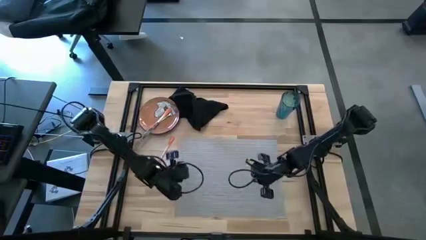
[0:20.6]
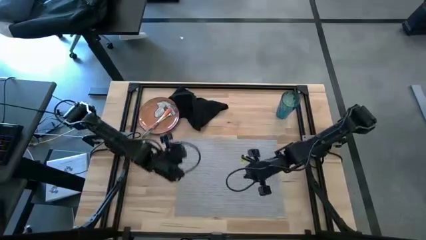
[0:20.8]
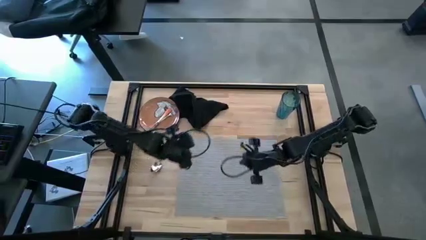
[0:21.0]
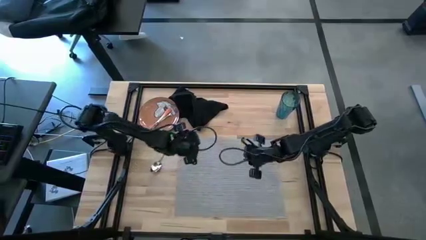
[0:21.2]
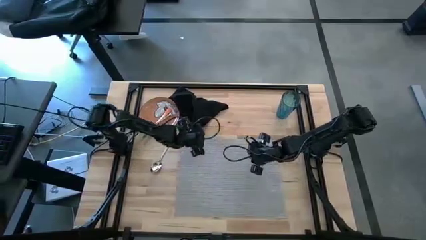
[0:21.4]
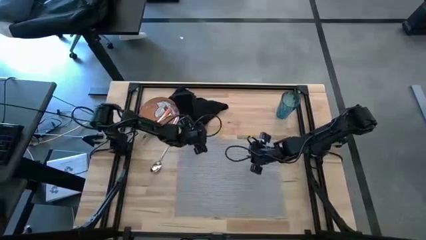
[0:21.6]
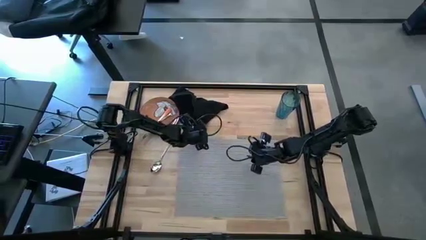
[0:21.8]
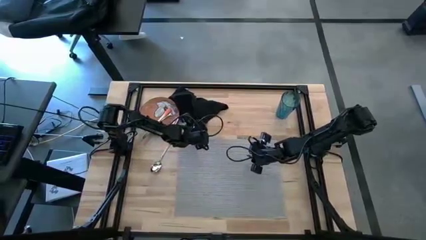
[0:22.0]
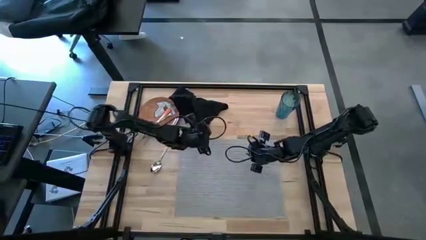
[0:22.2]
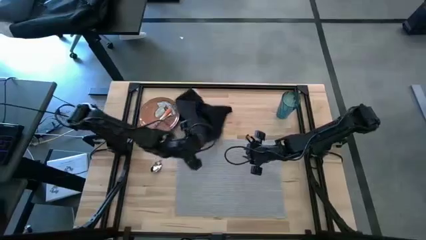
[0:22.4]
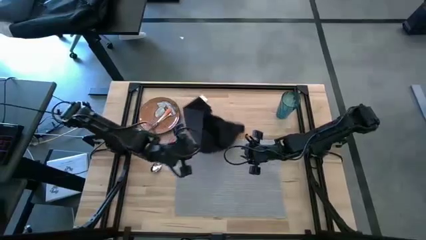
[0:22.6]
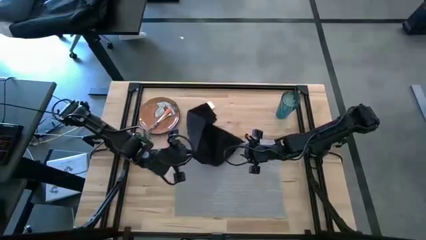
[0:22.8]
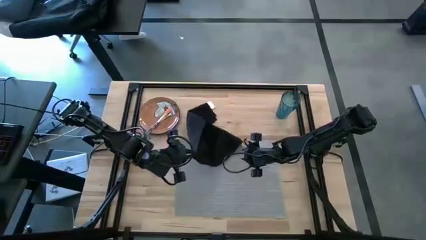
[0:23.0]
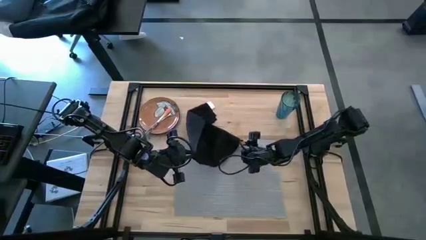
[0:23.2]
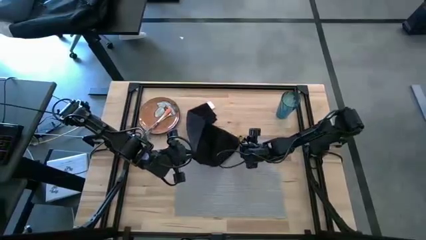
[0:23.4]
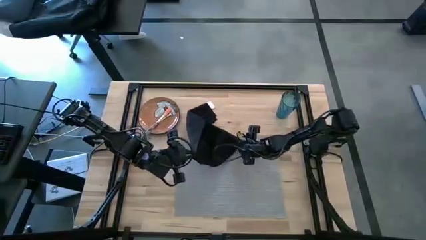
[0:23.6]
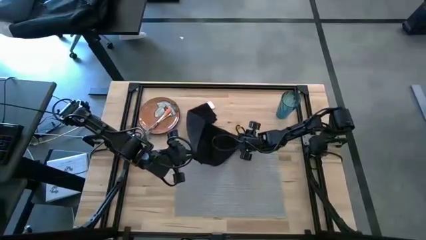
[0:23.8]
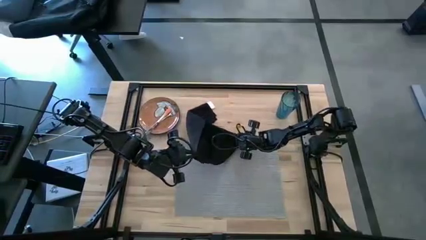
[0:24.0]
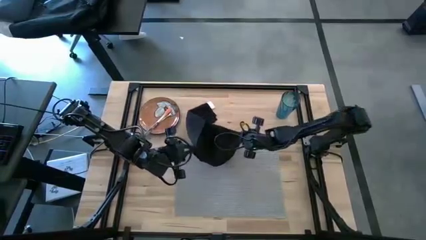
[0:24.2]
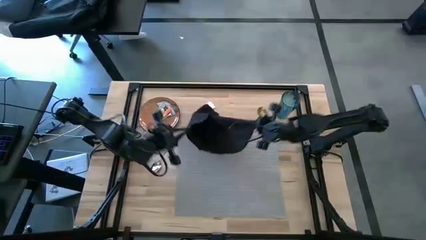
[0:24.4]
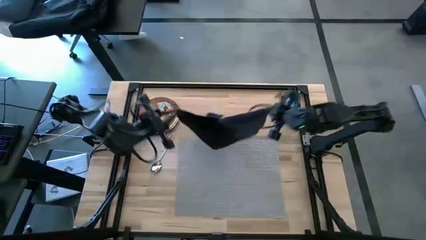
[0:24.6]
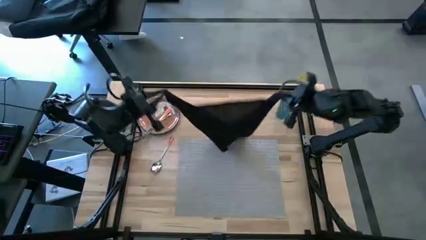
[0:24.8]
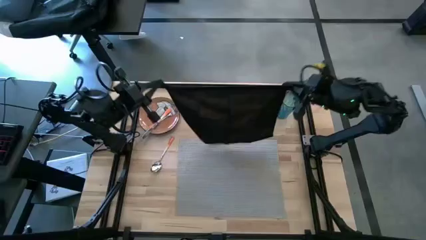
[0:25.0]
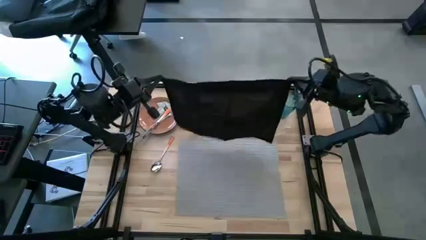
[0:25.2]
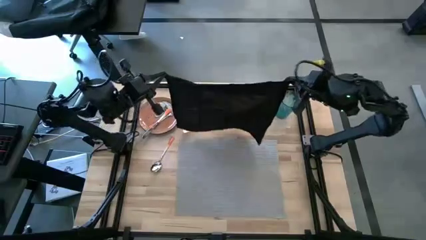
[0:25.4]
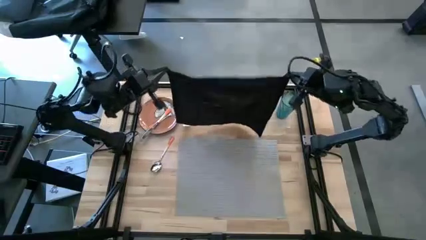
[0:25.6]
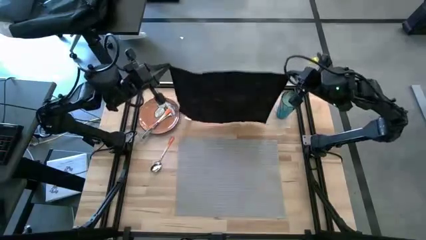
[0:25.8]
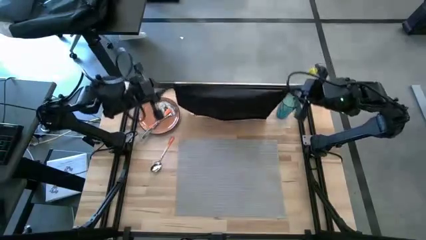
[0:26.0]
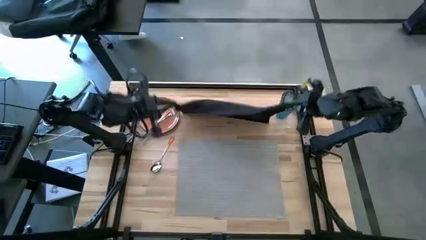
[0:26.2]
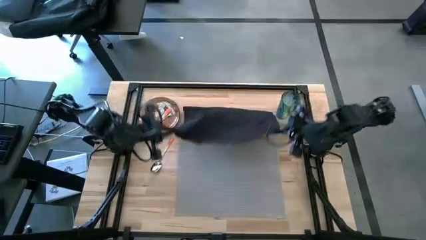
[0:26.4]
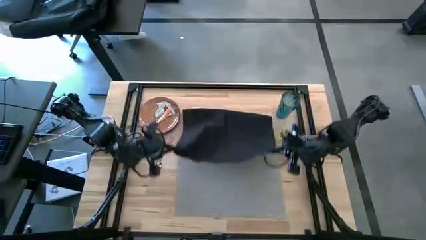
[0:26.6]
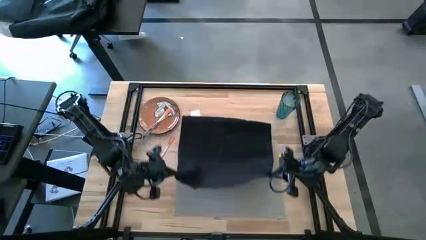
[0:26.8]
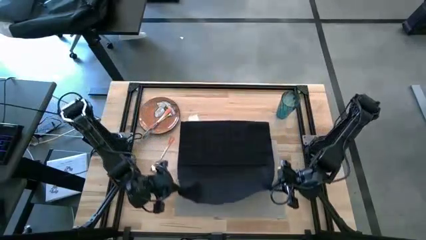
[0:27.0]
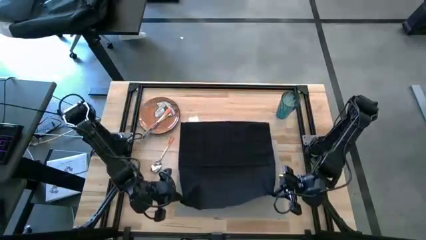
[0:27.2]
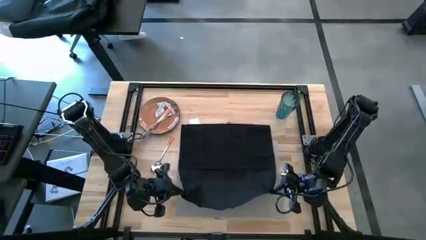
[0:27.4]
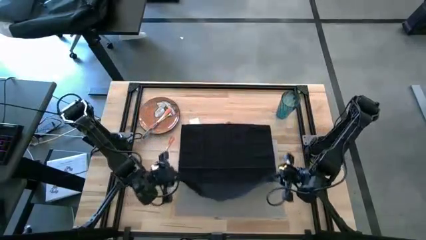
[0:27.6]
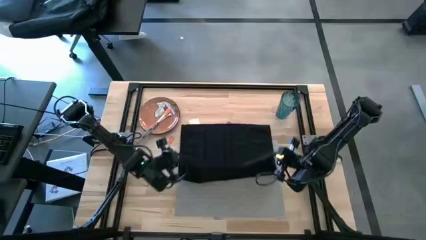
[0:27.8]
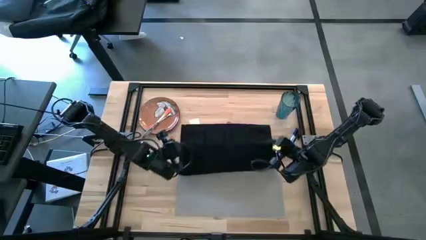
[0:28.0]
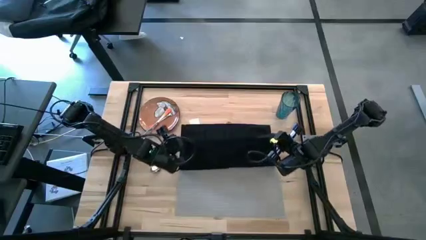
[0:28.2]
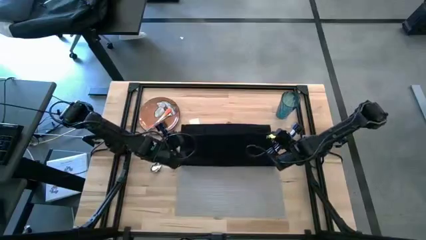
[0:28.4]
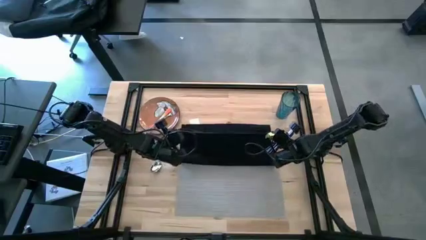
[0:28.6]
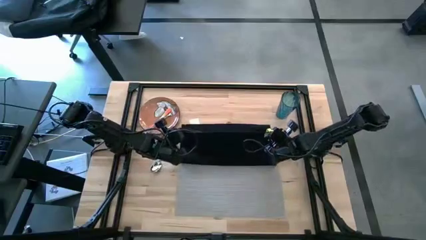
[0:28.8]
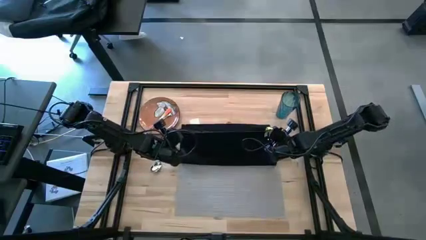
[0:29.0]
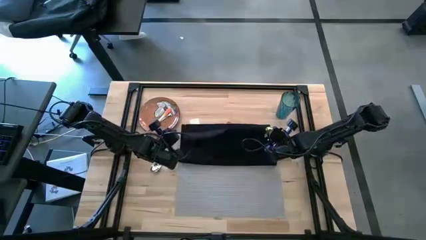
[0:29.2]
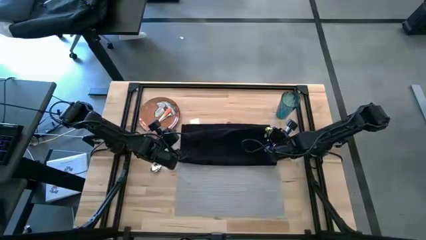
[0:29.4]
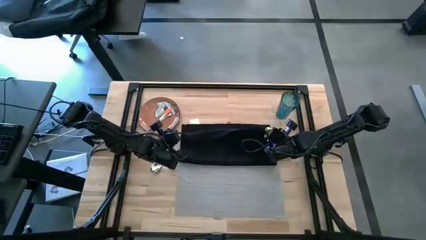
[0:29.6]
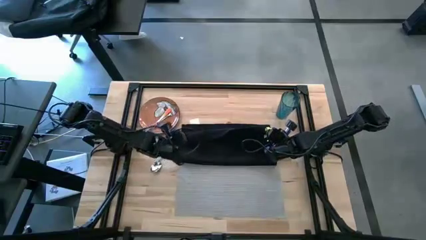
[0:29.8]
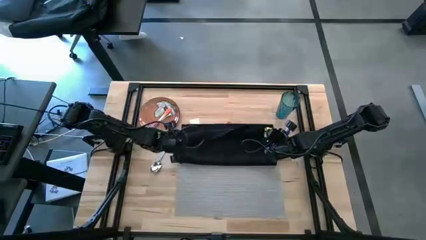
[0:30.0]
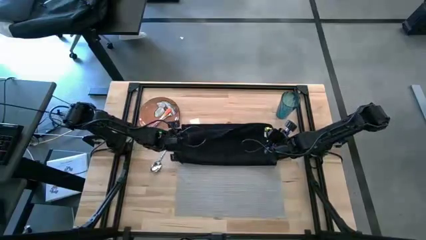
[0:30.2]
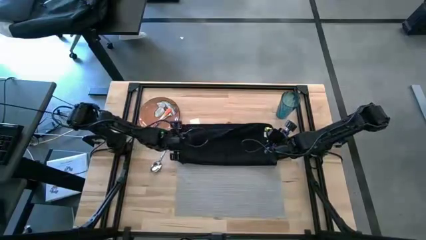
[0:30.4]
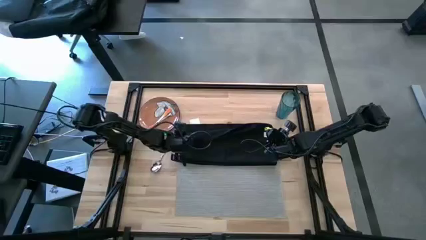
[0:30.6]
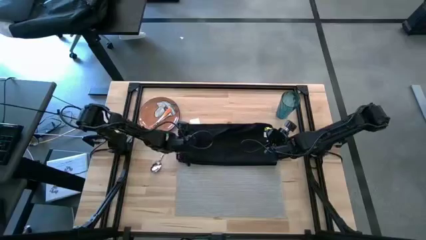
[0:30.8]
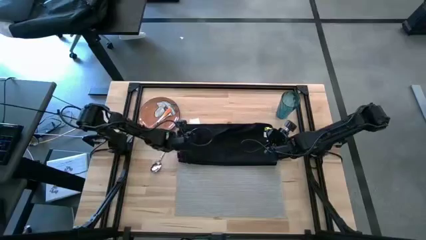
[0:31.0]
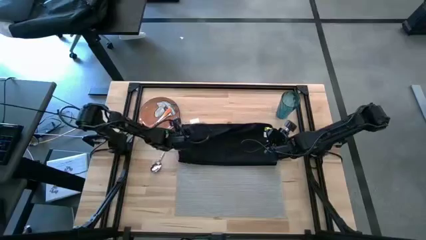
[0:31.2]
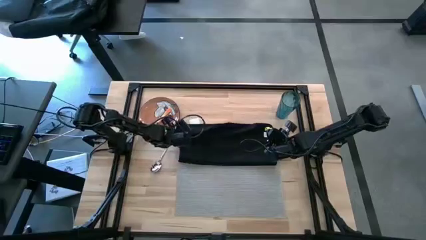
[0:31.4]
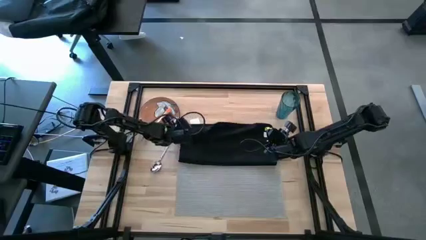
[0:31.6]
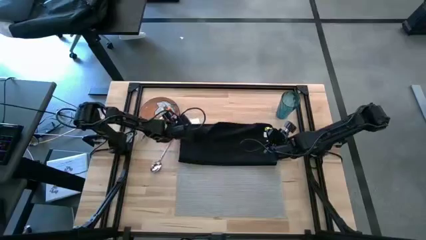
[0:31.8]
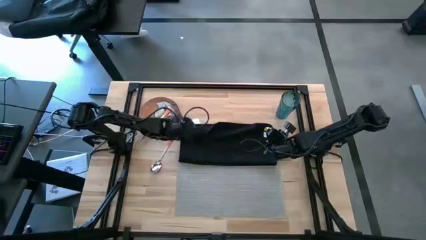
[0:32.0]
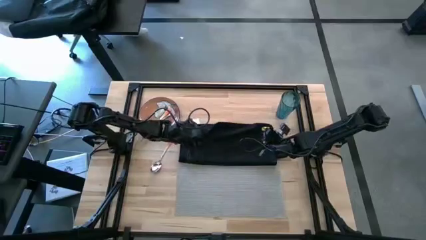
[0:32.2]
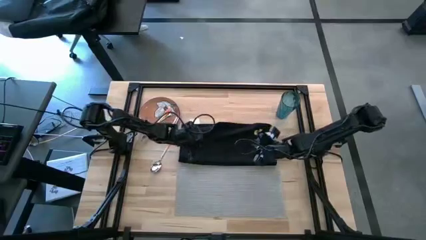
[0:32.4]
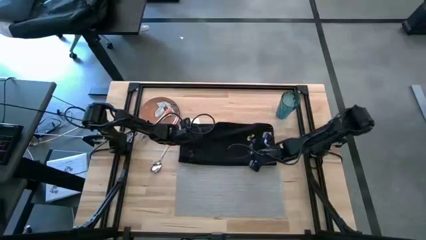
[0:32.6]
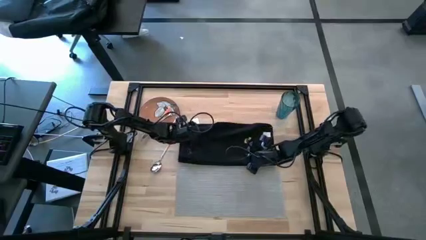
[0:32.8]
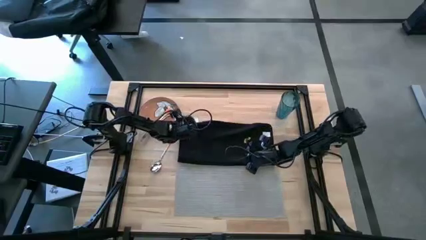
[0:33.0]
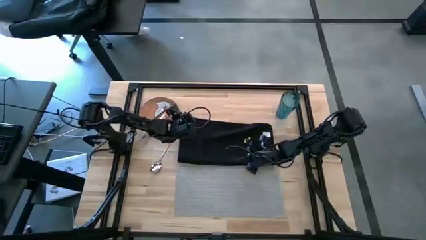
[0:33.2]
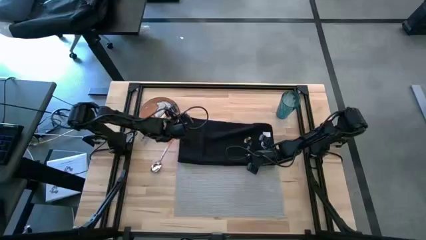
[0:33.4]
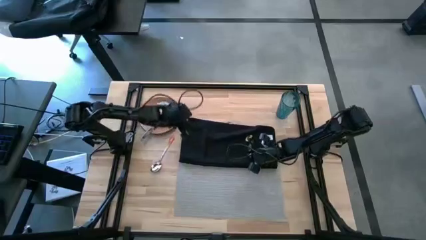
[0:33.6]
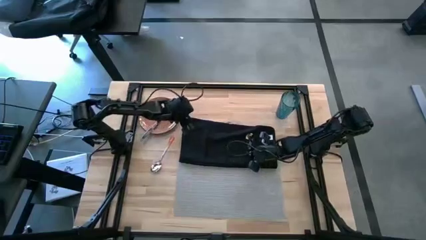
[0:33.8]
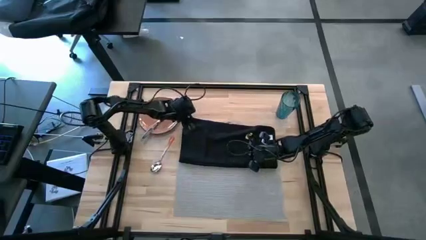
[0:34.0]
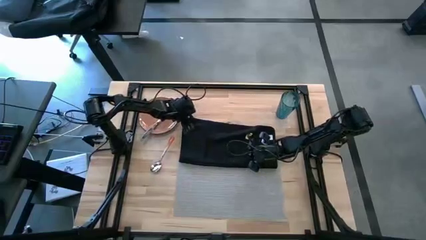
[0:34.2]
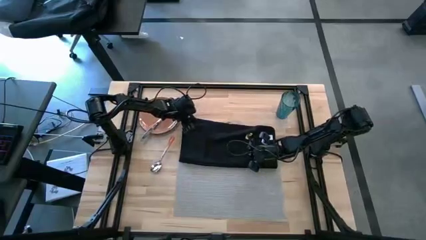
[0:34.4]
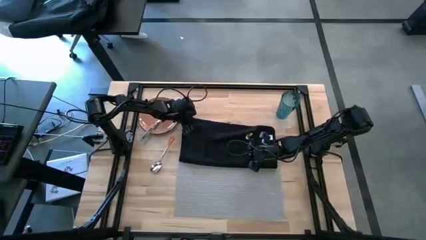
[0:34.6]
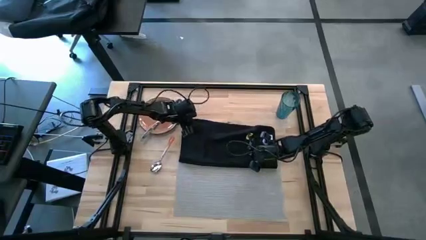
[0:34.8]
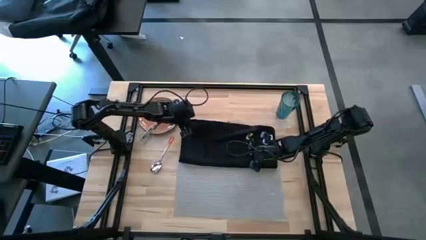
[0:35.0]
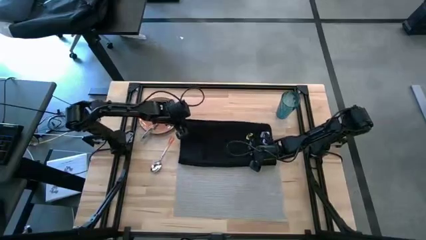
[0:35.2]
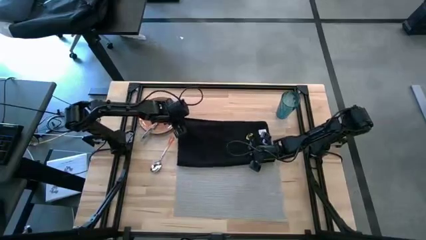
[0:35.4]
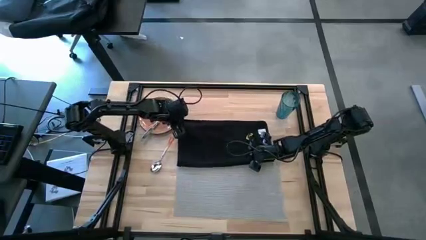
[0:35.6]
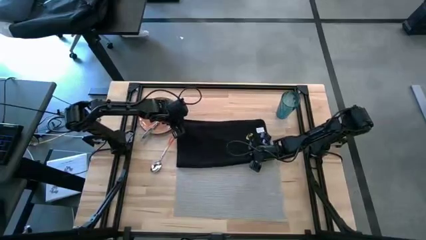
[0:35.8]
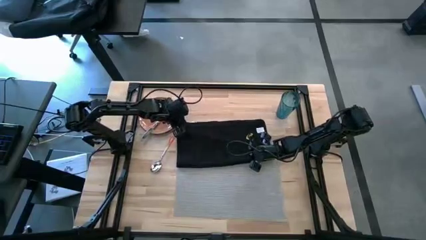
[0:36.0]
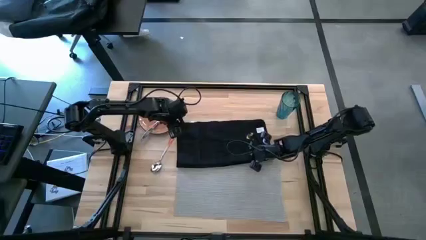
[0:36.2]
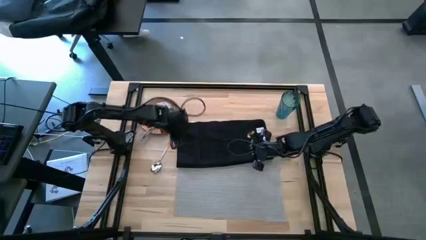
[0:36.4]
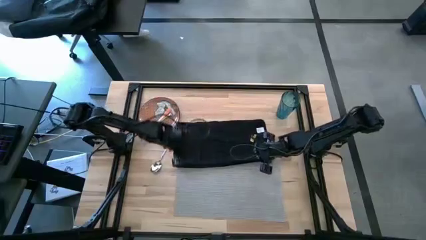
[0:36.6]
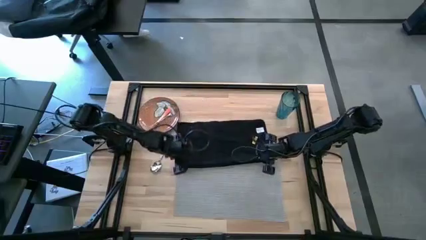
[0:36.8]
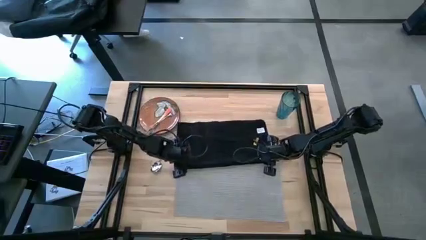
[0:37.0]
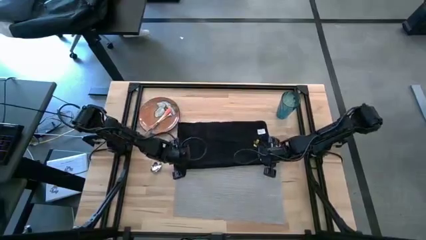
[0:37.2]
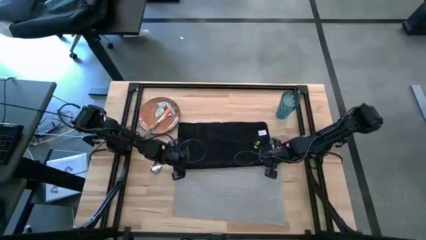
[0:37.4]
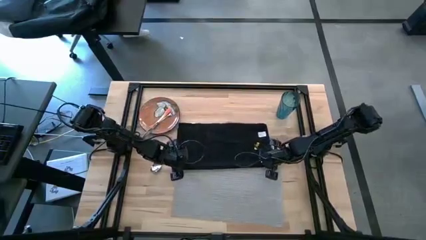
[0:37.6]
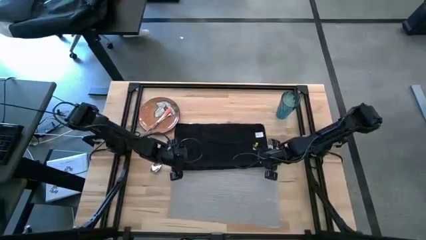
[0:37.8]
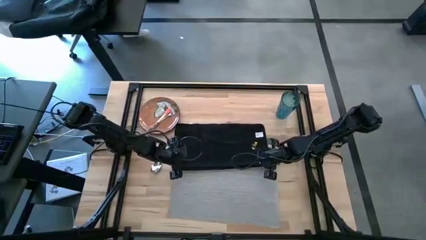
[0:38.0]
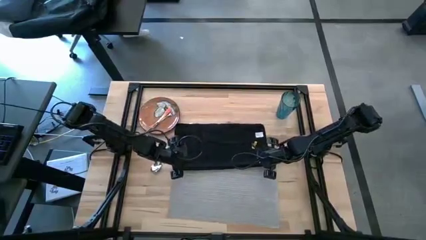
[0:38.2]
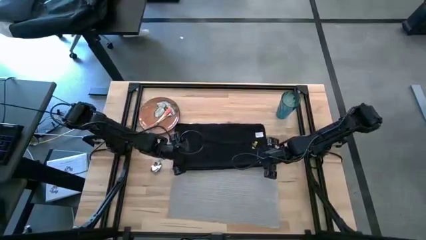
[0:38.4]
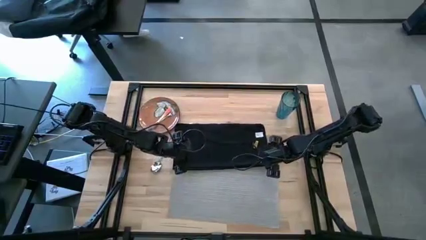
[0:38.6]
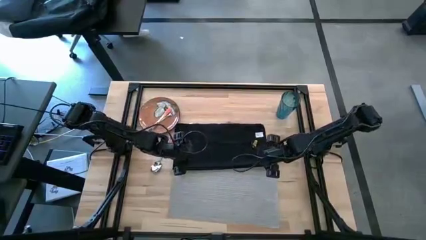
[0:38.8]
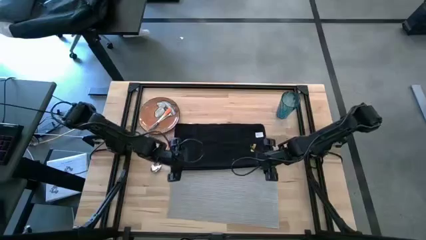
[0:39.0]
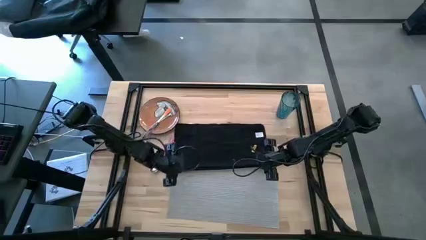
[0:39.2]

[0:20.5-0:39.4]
Task: Set table place
Fold the black napkin
